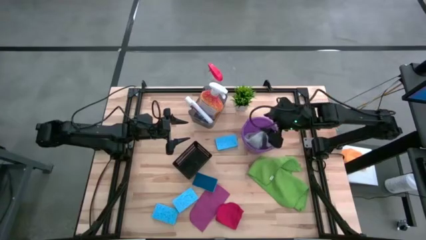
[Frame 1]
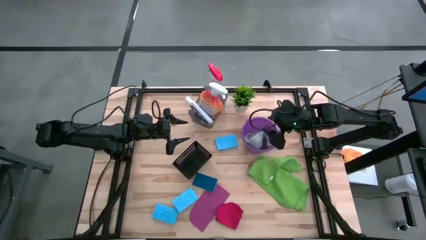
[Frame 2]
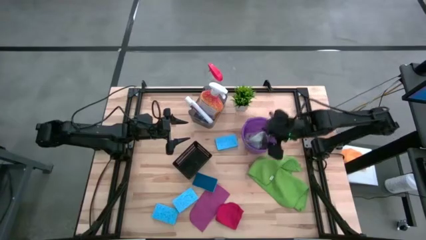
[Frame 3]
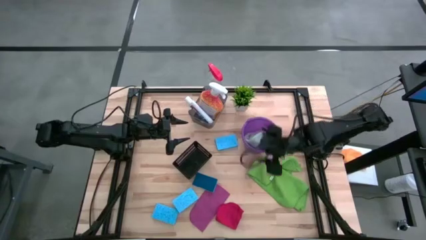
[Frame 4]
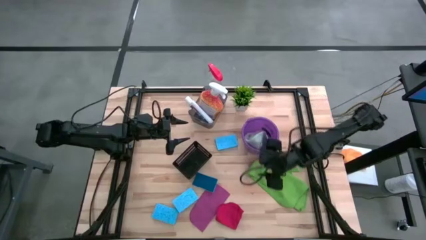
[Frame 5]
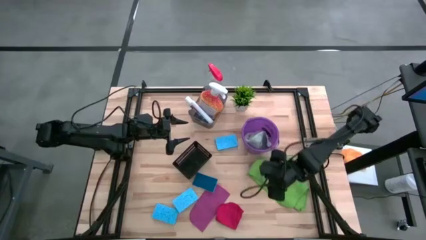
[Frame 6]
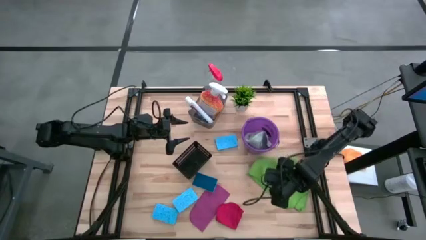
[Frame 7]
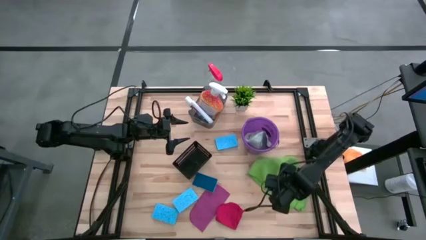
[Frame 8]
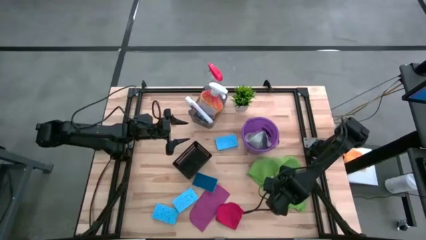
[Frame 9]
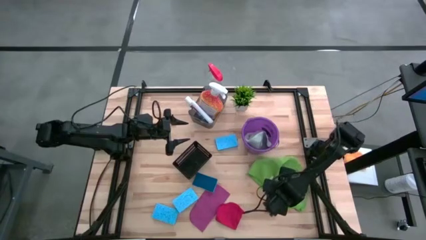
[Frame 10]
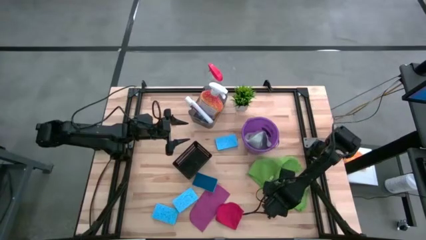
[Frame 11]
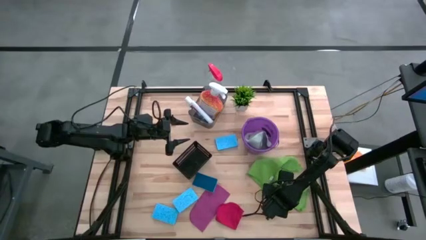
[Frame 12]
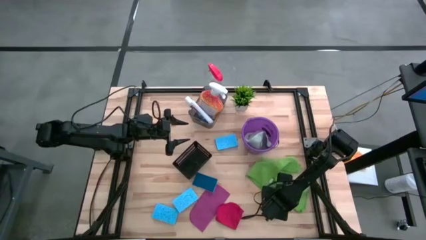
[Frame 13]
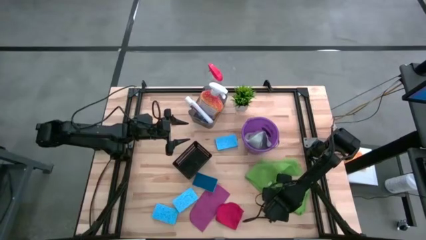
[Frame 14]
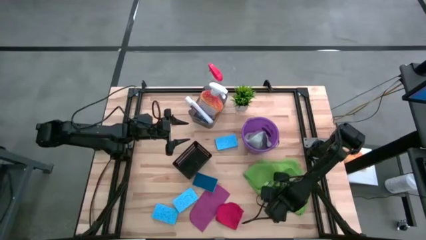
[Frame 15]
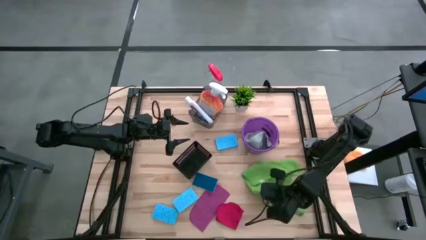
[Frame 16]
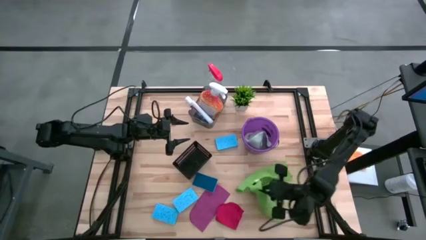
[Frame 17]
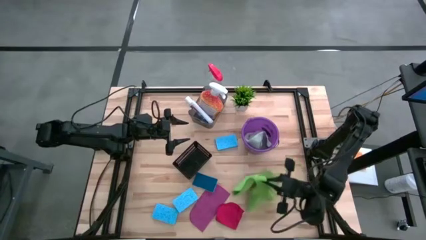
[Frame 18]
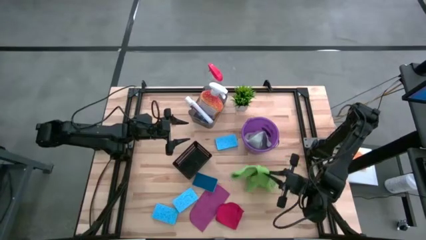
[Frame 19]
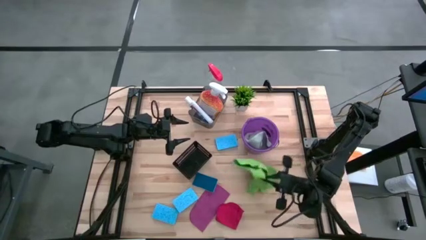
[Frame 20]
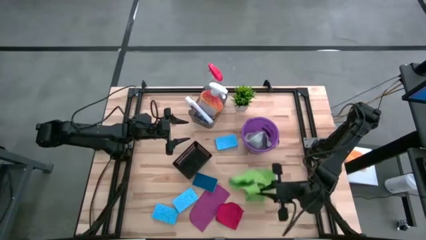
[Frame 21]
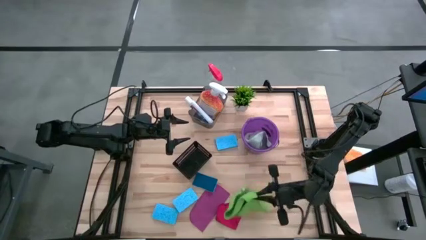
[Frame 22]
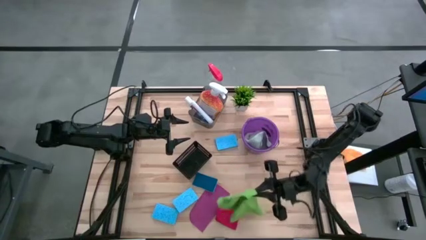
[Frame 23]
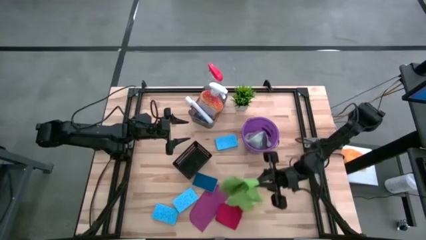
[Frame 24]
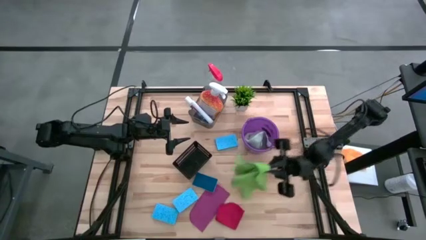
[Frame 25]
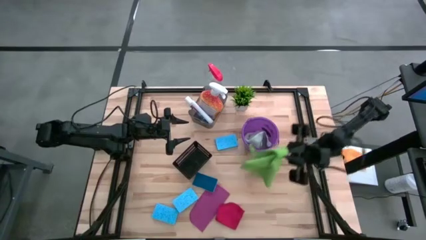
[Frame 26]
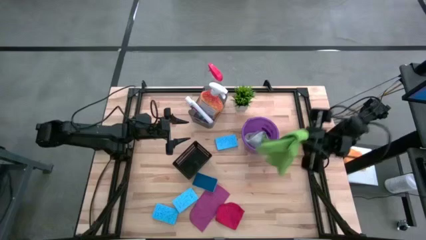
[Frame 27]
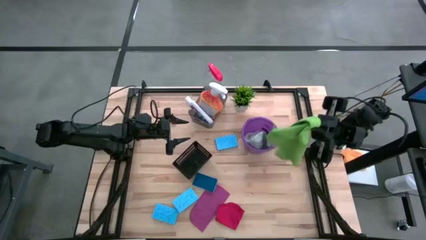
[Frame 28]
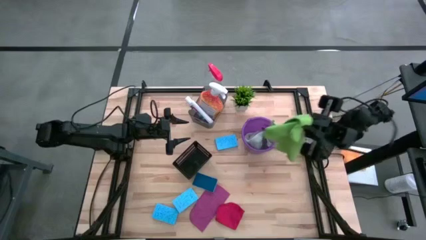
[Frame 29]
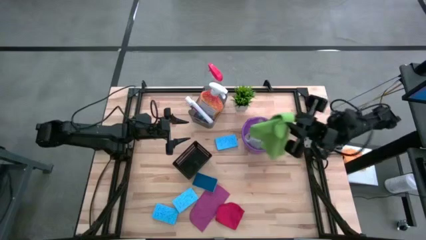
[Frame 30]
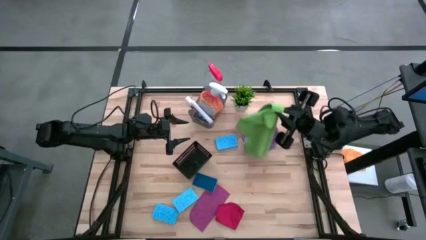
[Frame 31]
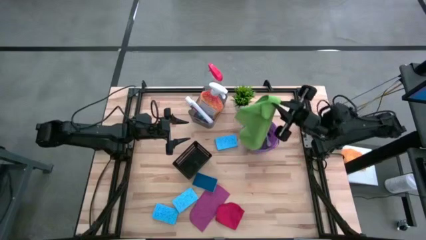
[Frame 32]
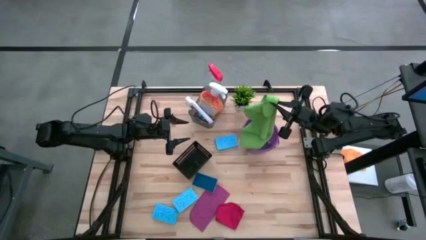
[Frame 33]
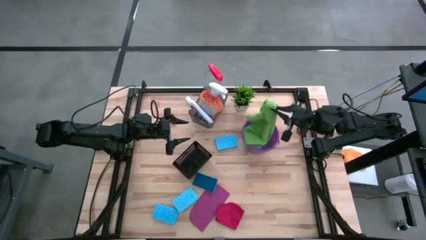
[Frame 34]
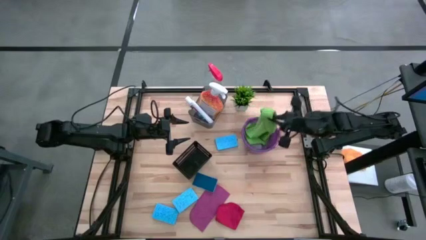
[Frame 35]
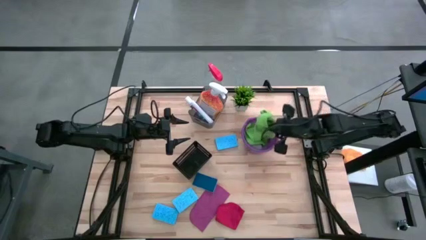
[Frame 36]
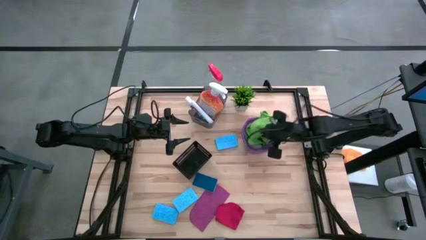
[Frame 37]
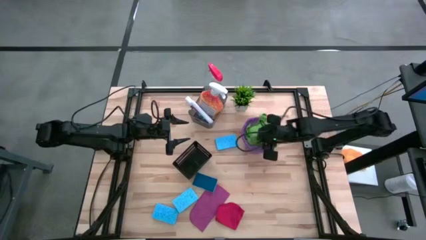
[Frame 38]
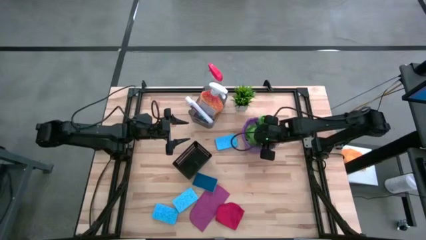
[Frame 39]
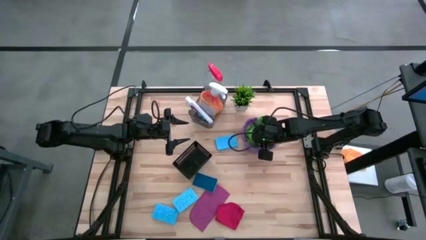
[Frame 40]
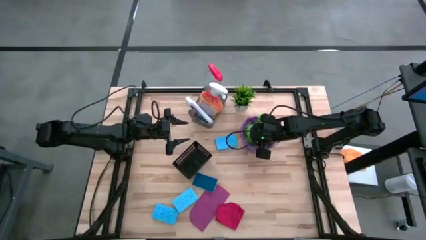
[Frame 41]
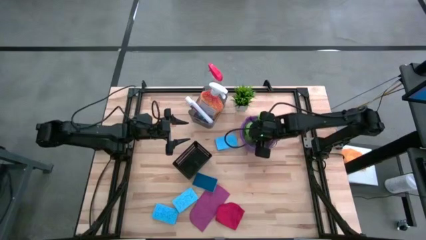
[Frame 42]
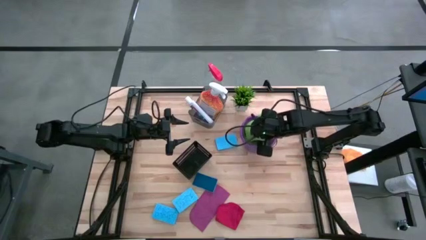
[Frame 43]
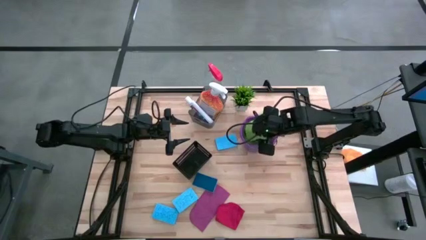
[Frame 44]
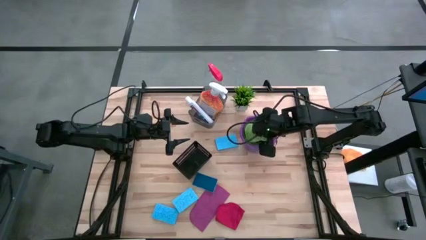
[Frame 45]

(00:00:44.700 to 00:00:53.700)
Task: Pick & Place Kitchen Items
Put the green microfiber cloth into the violet bucket

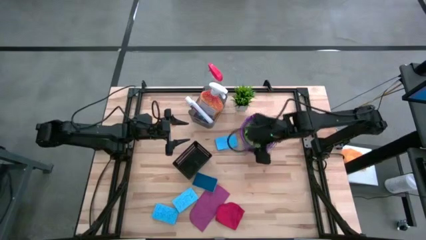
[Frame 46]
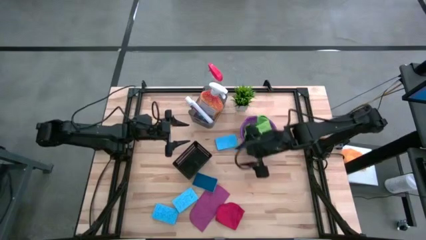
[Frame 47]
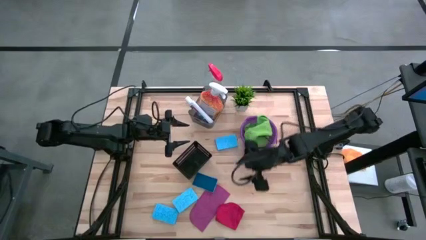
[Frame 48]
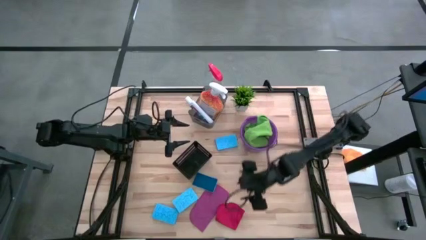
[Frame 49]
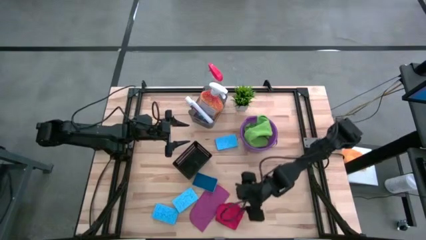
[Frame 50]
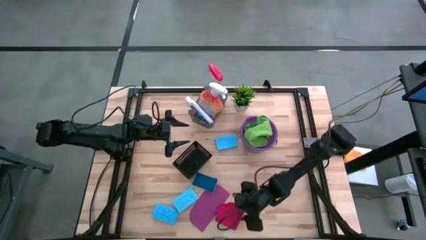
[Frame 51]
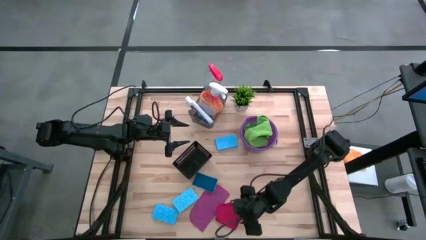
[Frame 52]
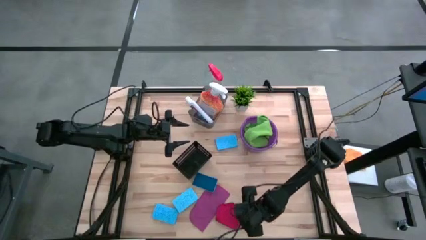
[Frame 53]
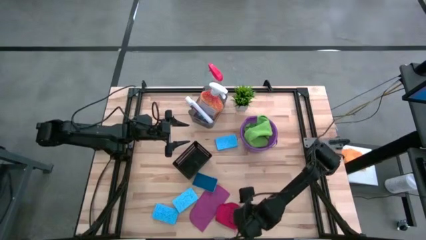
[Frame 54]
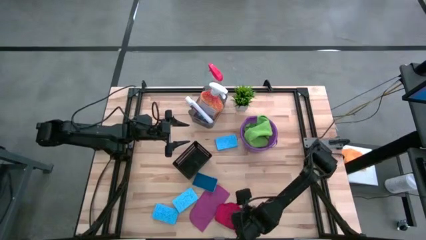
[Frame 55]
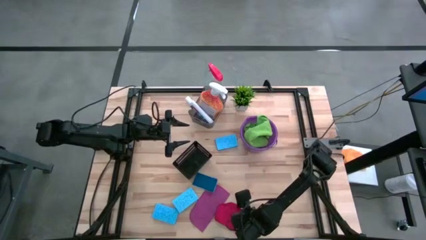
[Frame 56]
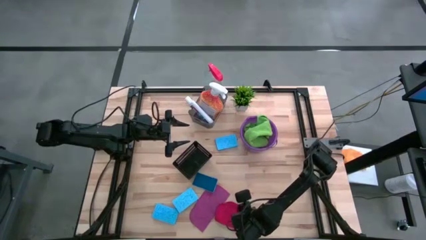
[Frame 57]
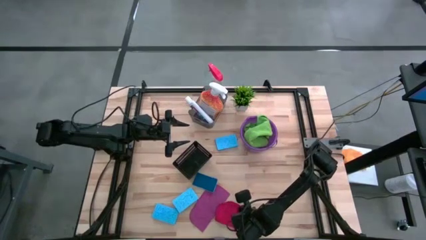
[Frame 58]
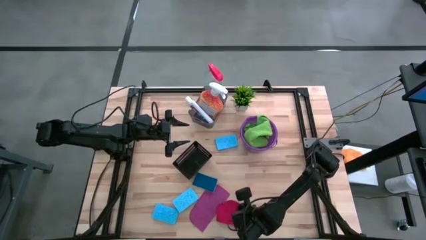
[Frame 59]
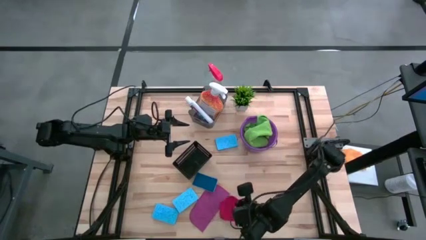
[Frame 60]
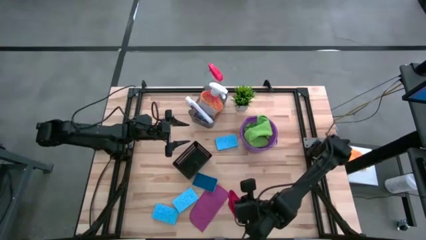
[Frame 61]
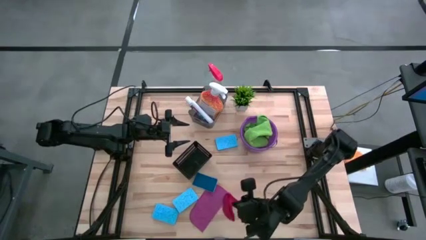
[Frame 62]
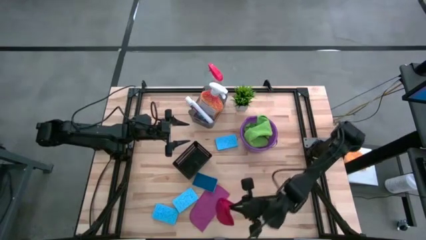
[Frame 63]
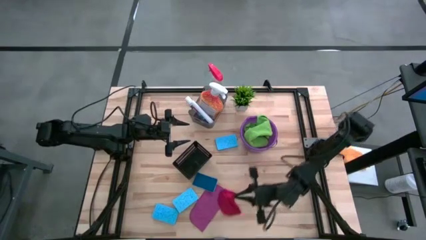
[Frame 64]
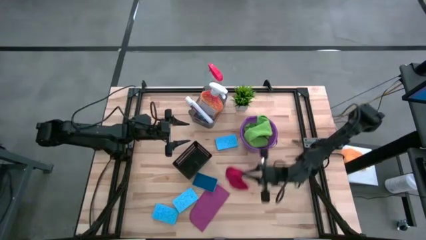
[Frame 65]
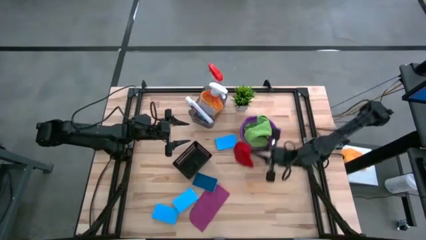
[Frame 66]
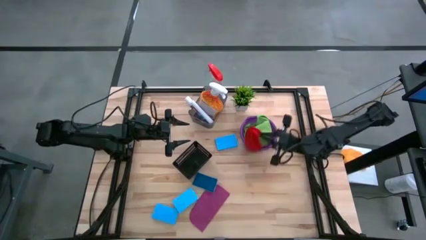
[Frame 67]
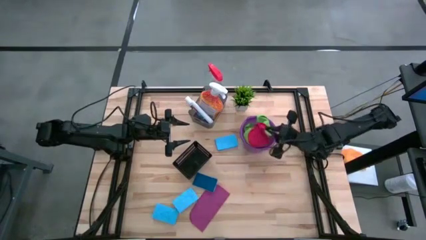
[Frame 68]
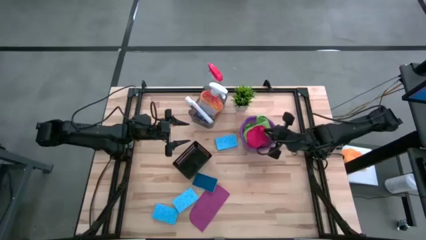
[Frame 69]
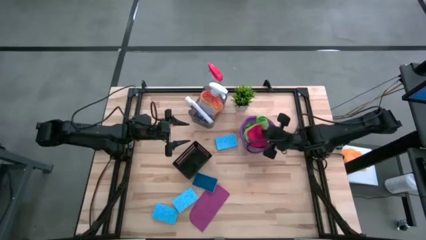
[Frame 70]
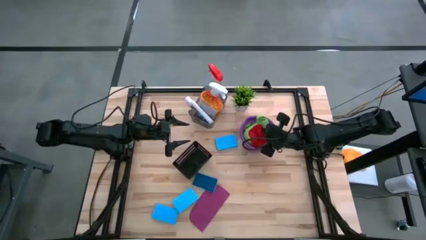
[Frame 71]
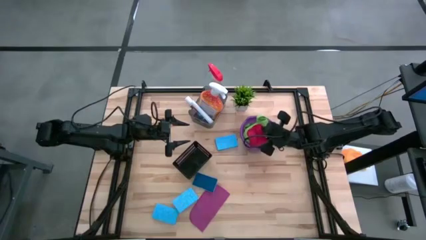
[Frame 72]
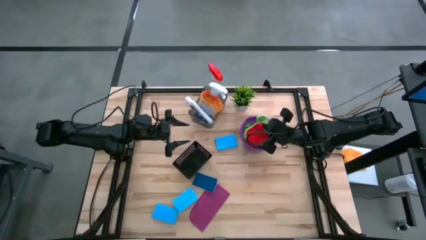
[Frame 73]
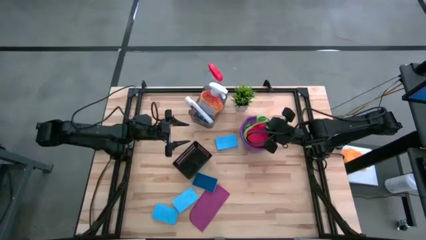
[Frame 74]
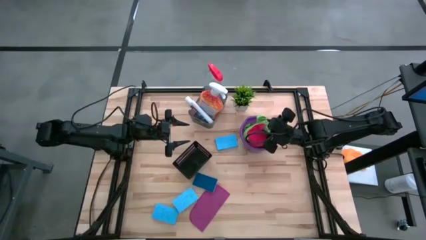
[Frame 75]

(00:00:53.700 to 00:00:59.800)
Put the red microfiber cloth into the violet bucket

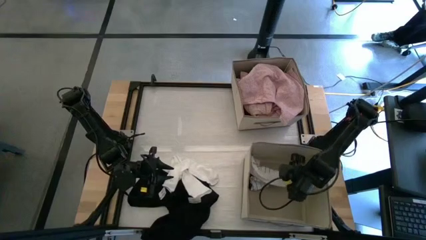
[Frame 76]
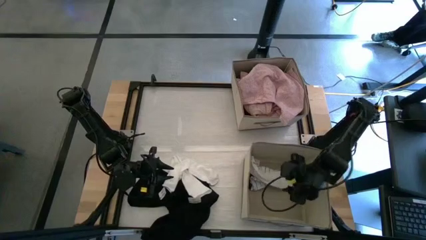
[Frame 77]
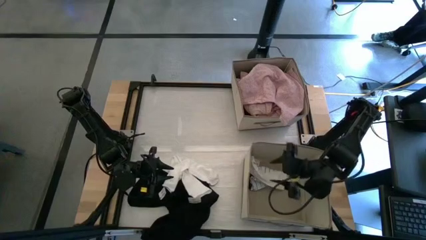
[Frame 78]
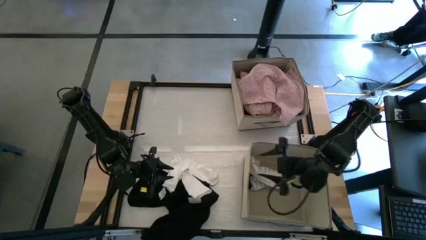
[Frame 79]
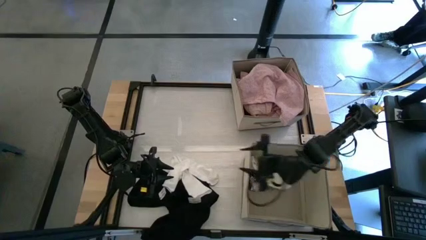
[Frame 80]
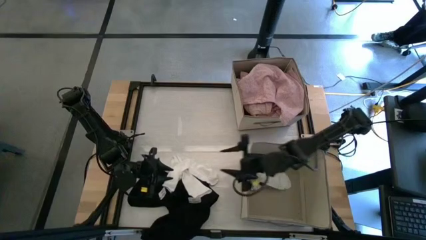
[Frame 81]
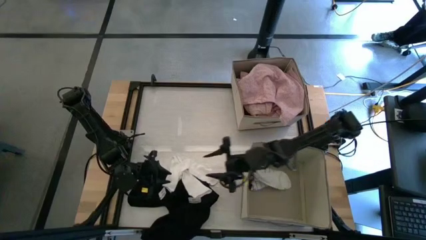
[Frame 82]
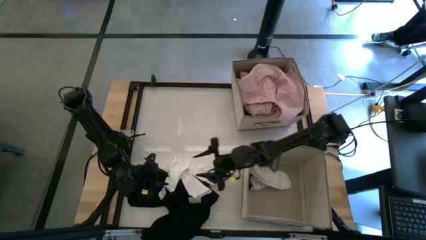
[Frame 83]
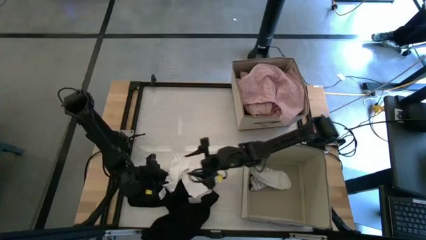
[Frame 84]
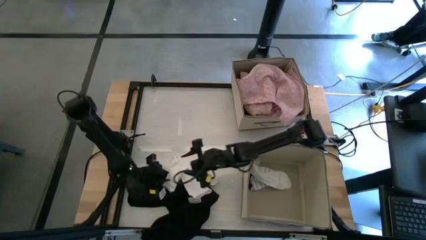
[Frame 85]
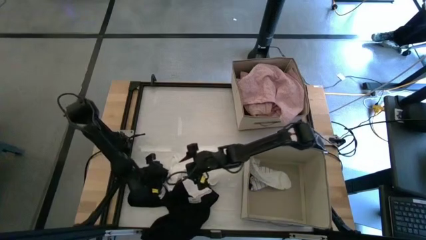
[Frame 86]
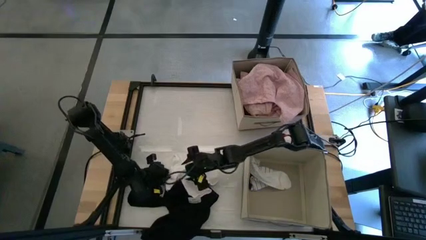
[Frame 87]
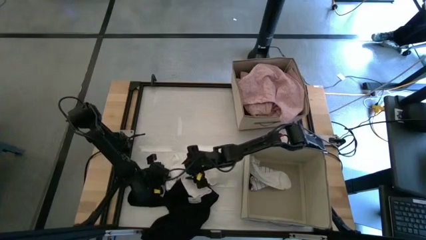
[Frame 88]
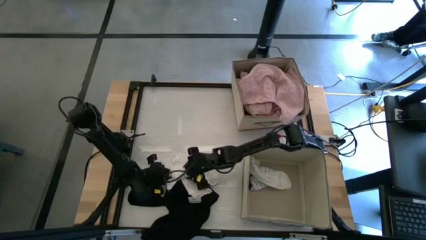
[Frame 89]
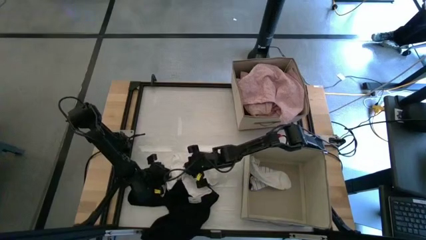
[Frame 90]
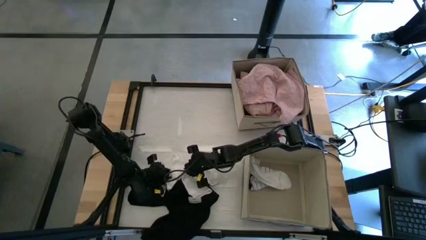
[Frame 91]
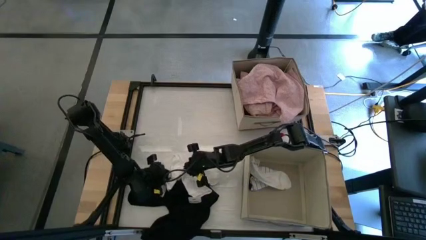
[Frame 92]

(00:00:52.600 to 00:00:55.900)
Task: Sort clothes
Put the white sock into the bottom laundry organizer
